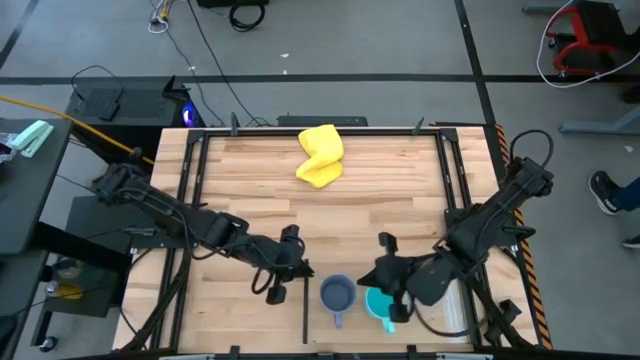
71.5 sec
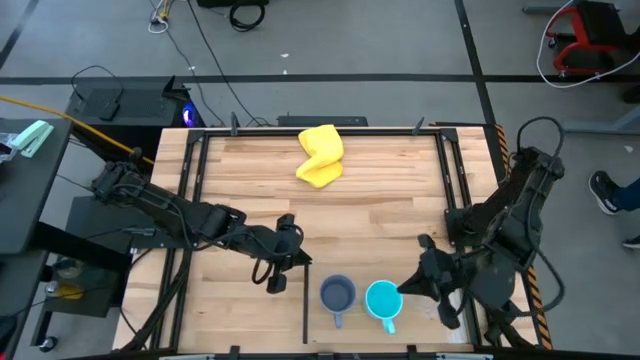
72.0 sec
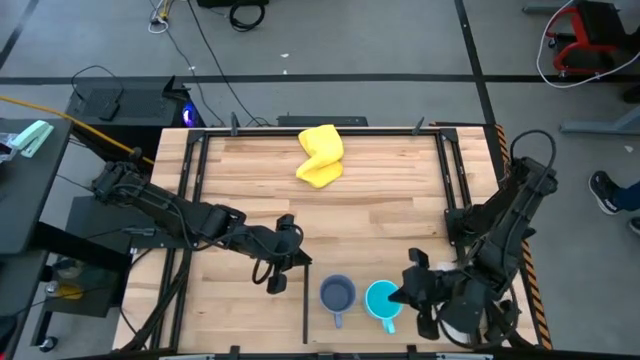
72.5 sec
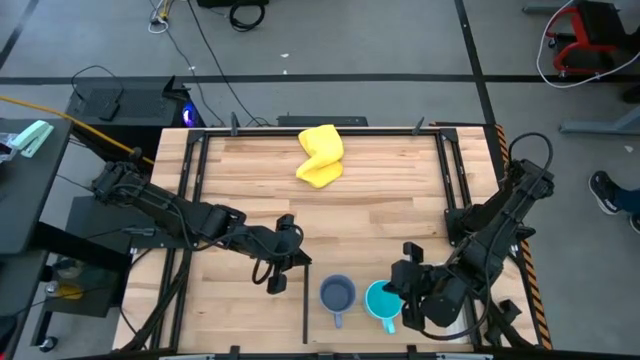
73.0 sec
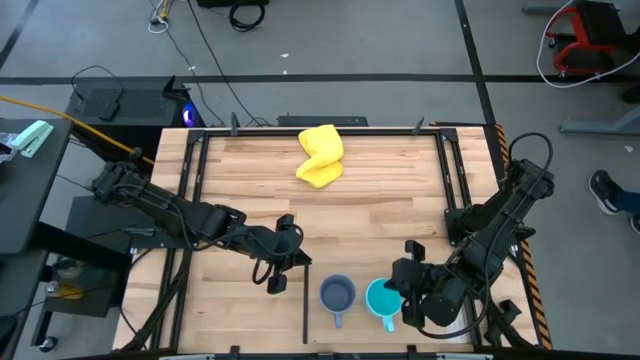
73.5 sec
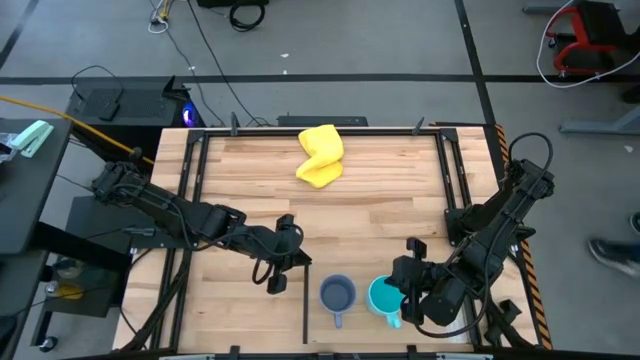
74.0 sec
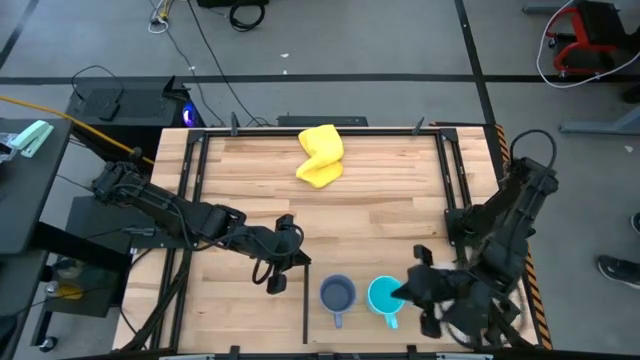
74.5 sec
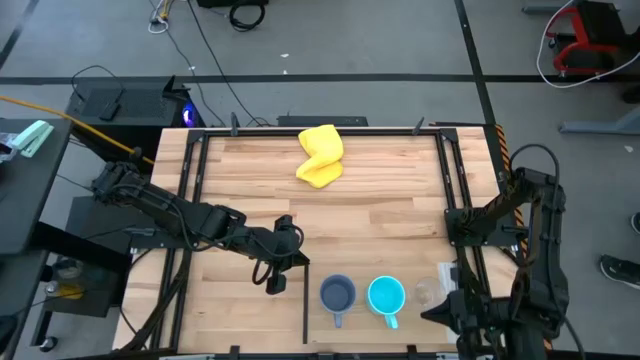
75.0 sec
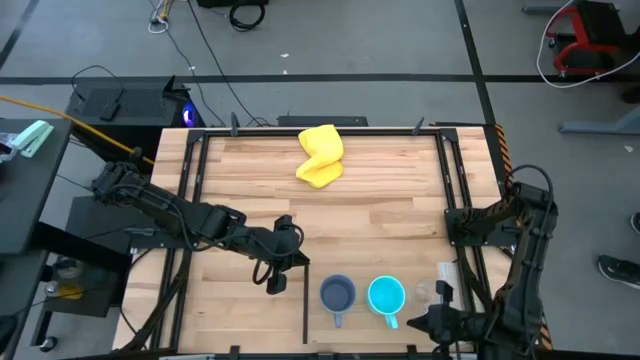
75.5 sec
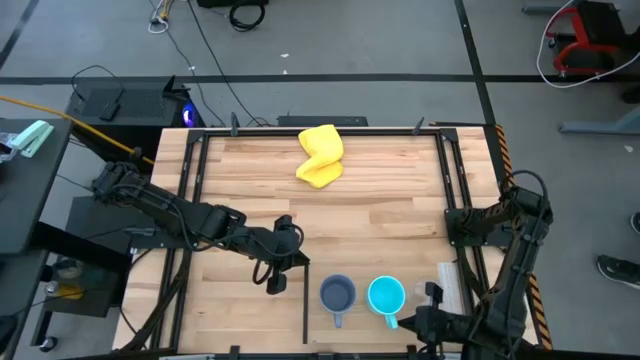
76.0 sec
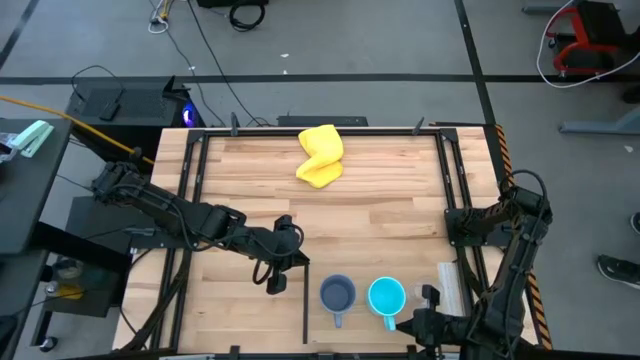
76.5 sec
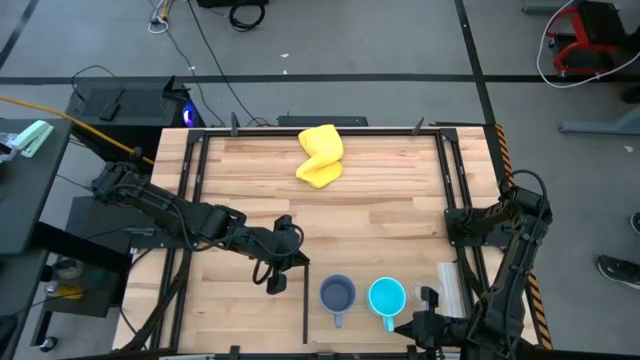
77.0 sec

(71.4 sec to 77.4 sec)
Task: Stack small to large cups/mugs on shelf
Adjust the blue mug on the shelf

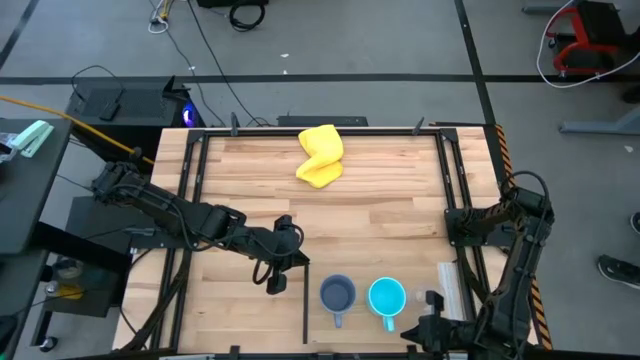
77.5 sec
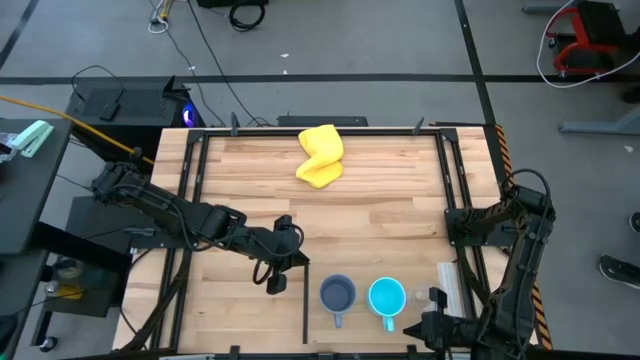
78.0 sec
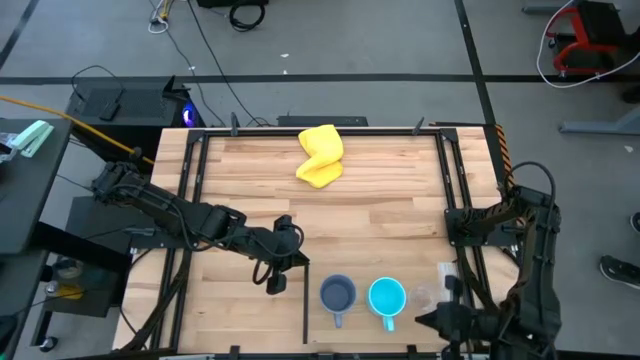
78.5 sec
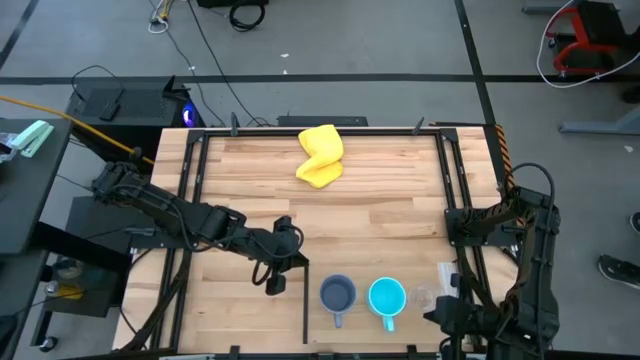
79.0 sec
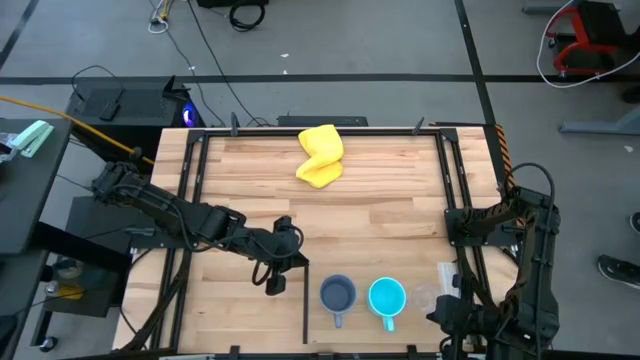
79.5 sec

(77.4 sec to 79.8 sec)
Adjust the transparent mug on the shelf

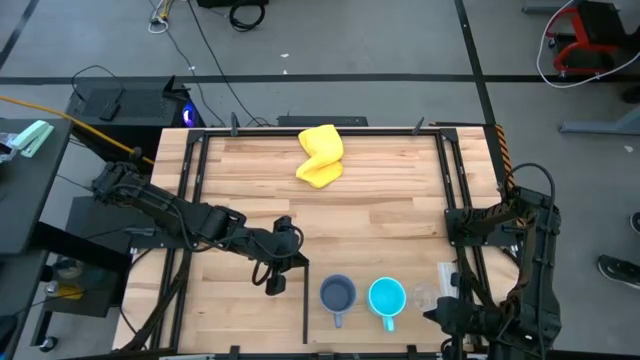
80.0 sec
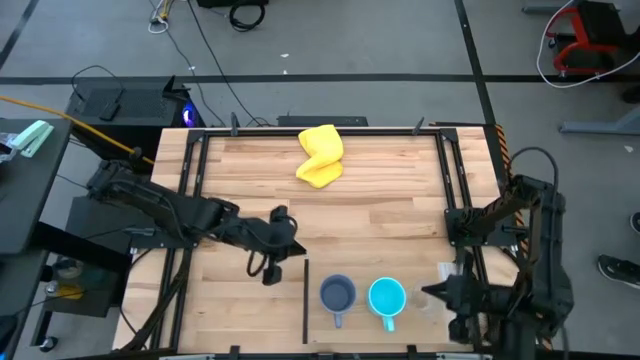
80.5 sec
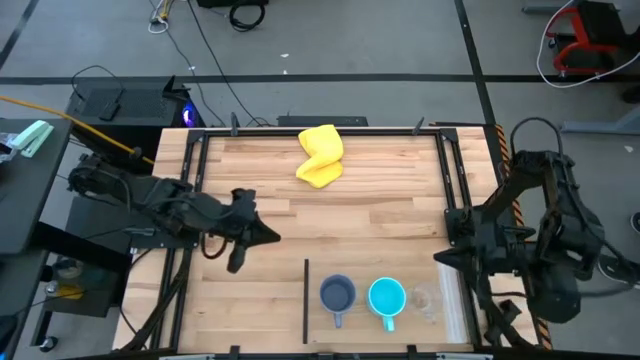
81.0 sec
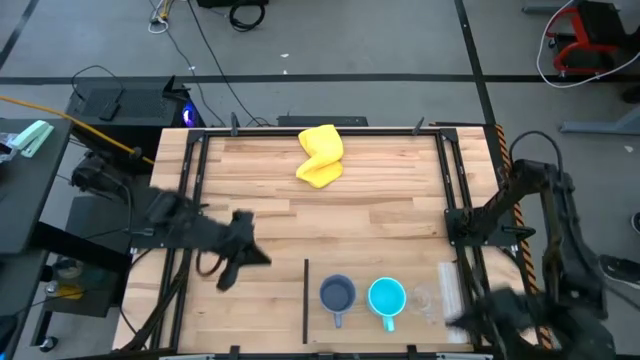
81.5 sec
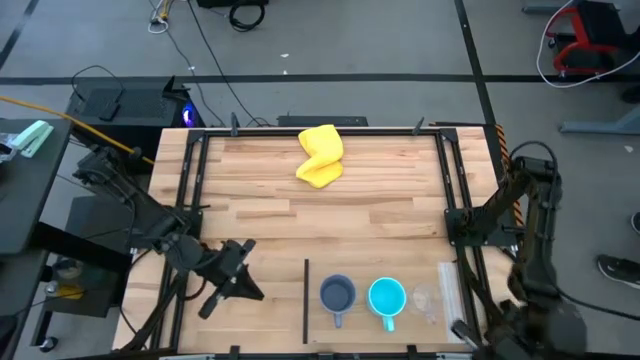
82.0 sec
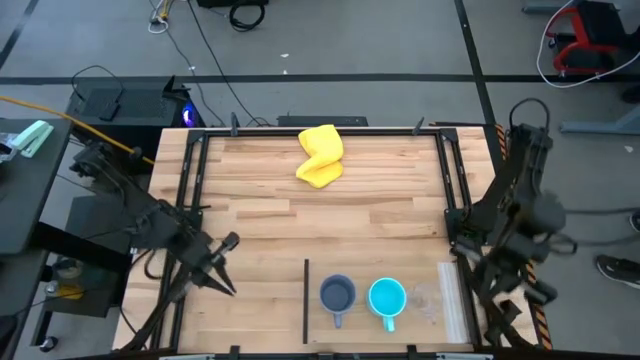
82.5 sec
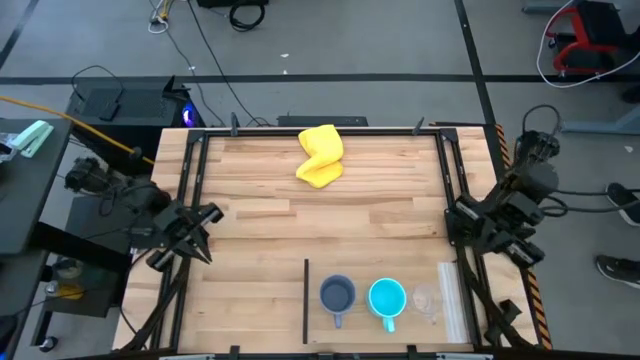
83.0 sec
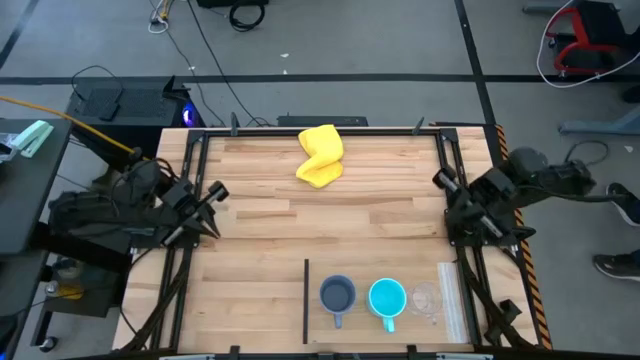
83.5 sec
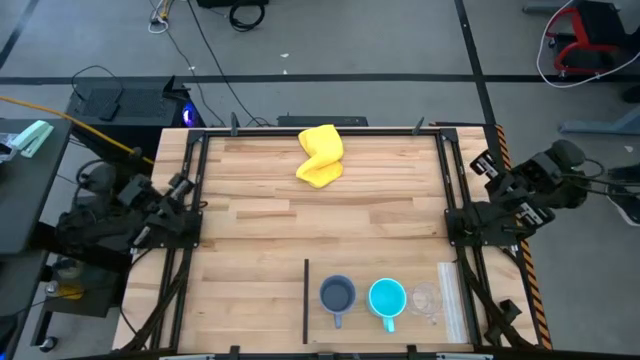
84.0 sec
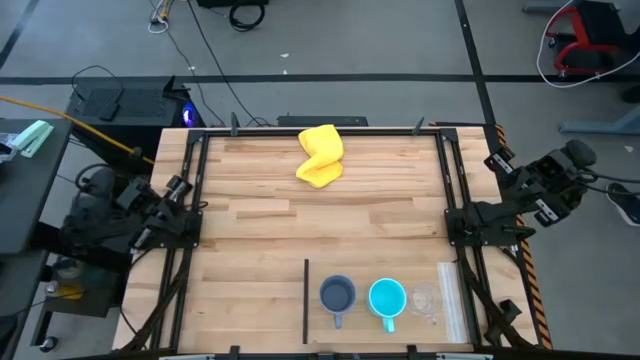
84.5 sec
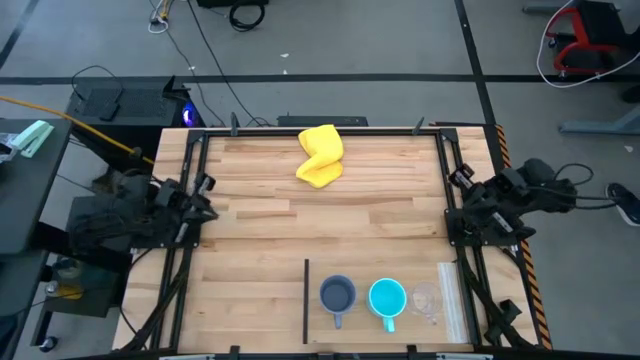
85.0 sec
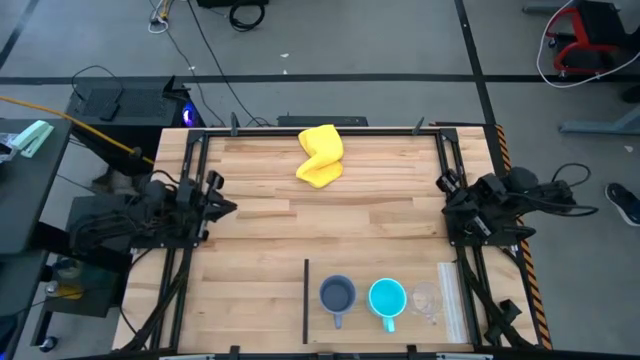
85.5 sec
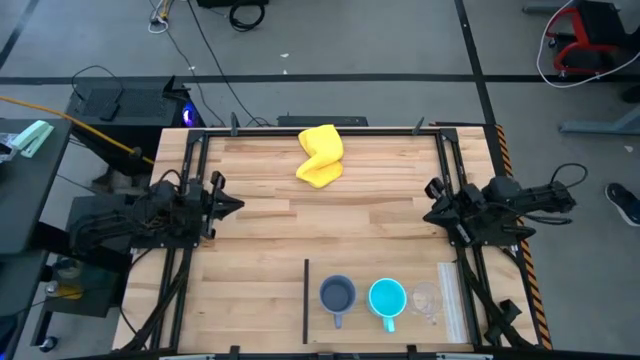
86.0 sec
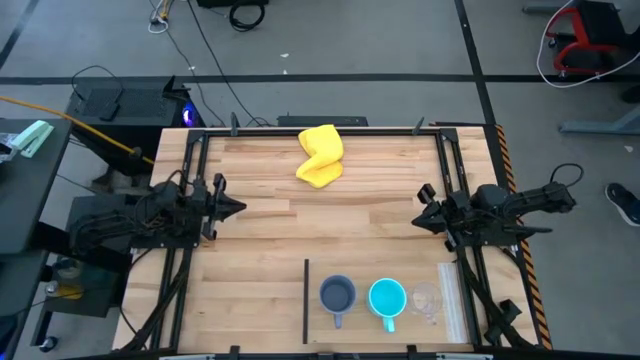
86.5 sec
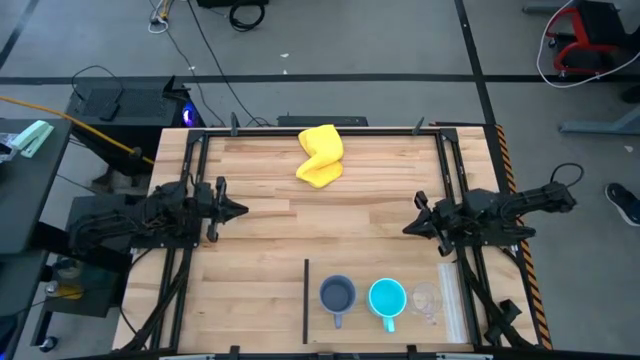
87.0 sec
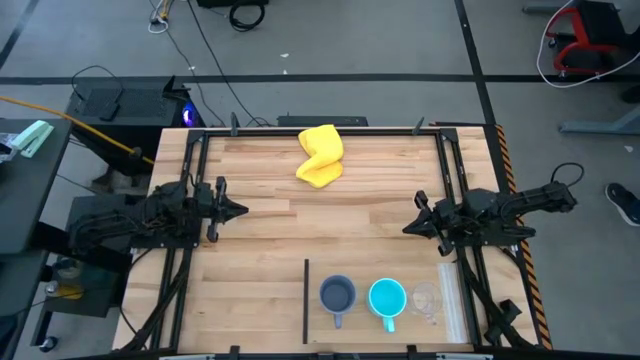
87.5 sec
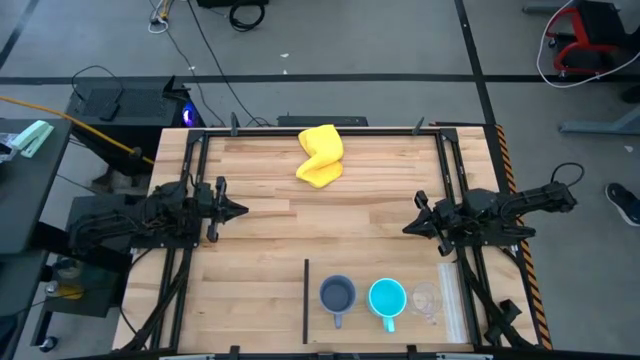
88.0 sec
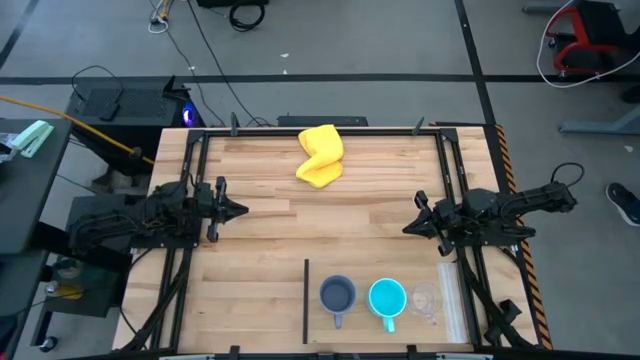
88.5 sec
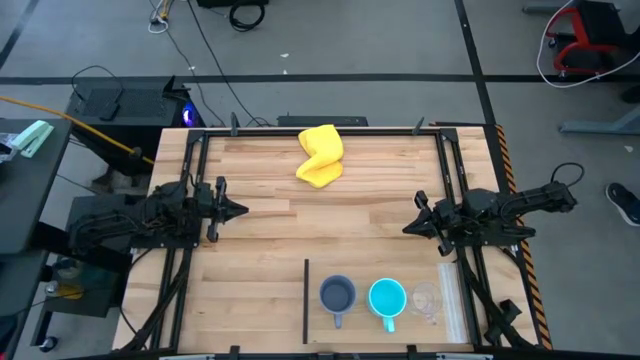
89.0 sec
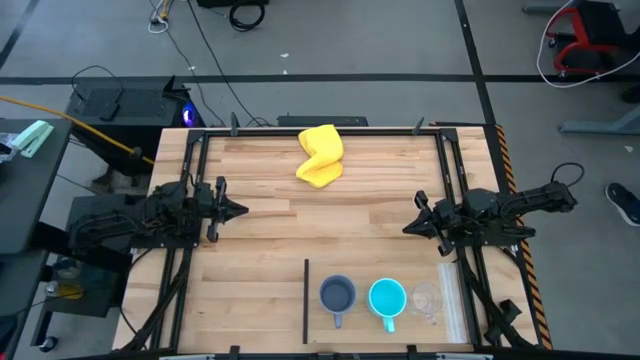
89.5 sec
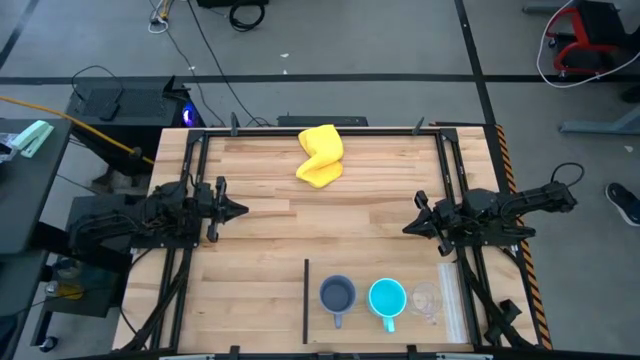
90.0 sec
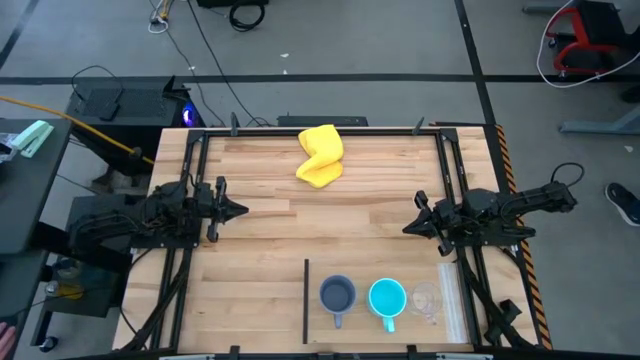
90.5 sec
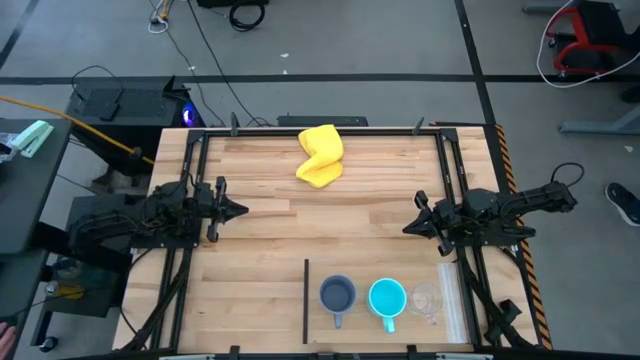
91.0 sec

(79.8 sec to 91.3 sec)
Return to Home Position

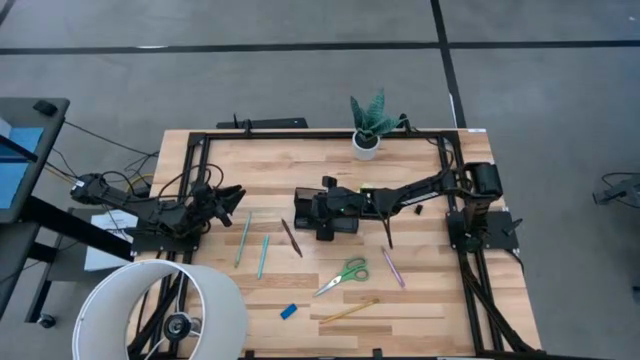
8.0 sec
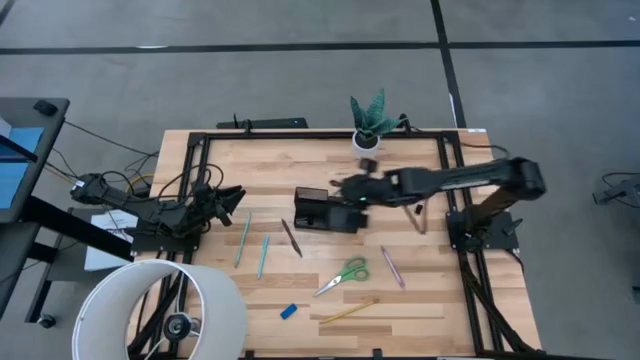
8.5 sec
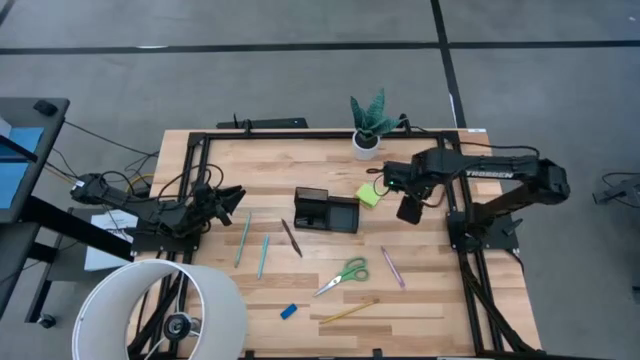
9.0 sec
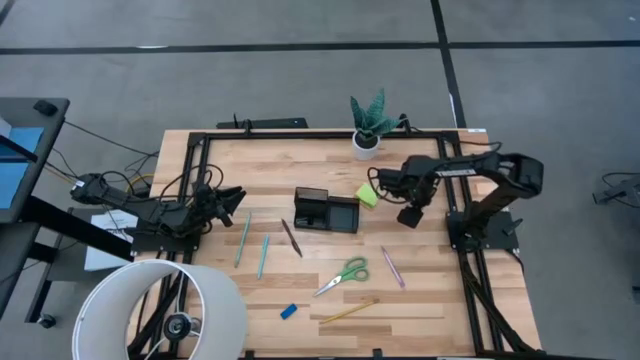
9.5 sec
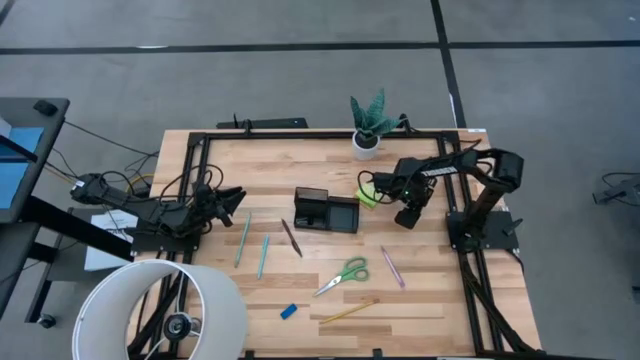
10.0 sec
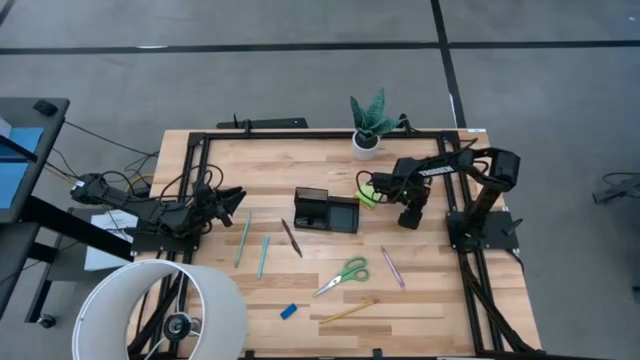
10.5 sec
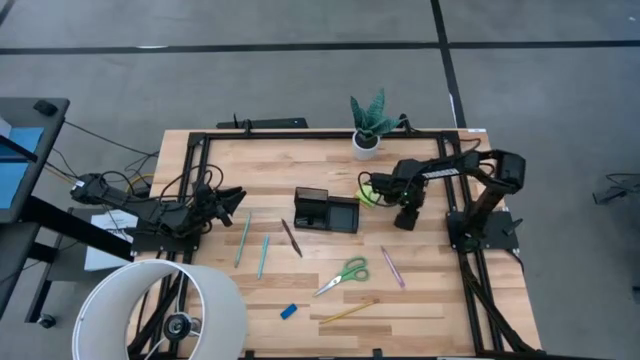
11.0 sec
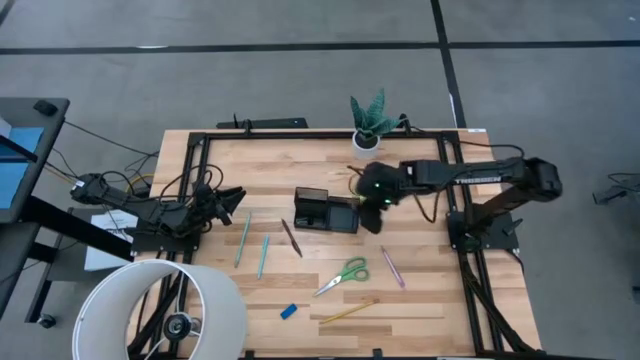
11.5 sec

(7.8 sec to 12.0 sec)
Task: Pick and place office supplies into organizer
Put the black binder clip into the black desk organizer
